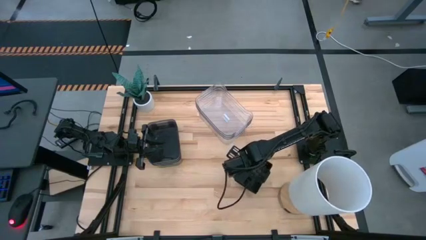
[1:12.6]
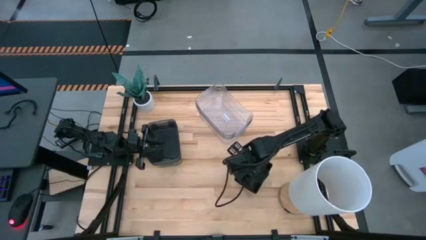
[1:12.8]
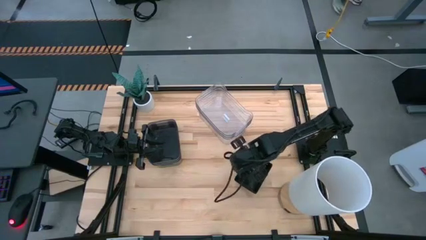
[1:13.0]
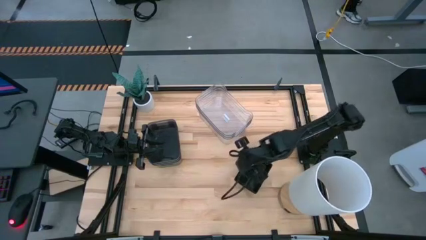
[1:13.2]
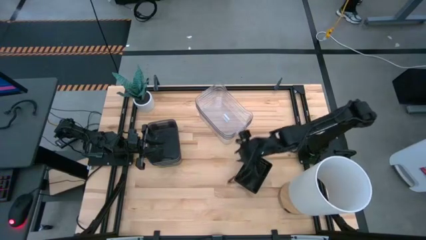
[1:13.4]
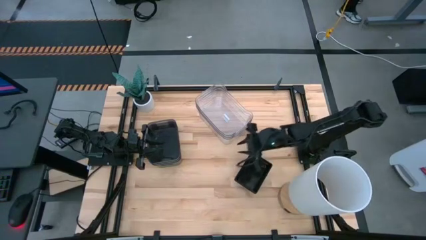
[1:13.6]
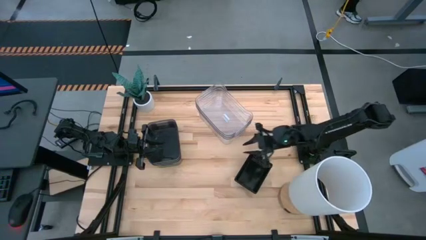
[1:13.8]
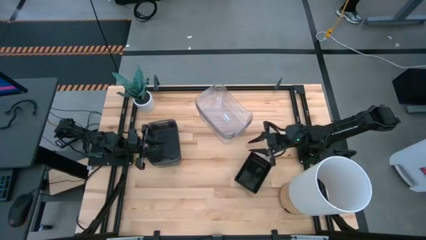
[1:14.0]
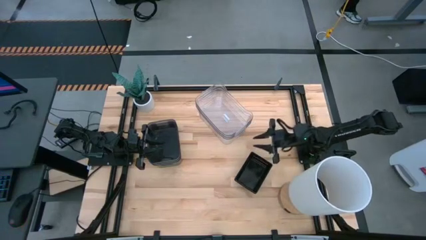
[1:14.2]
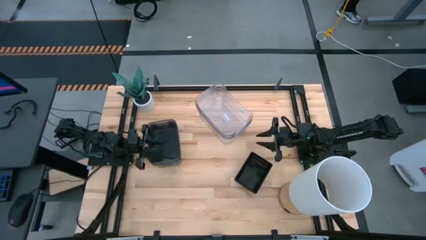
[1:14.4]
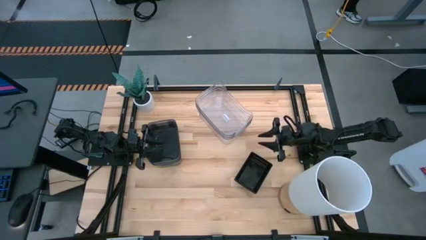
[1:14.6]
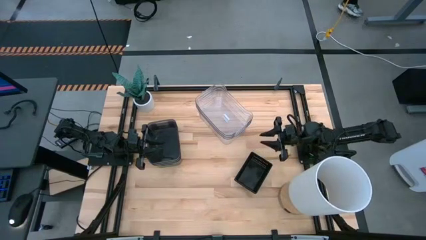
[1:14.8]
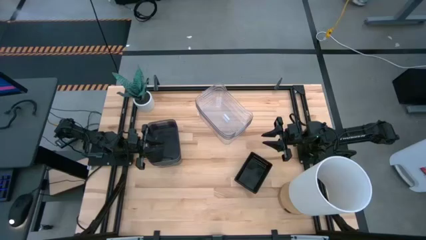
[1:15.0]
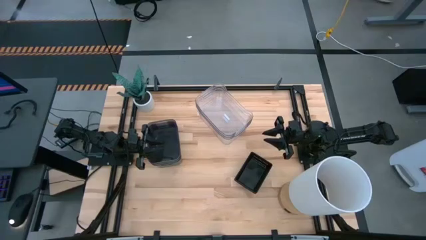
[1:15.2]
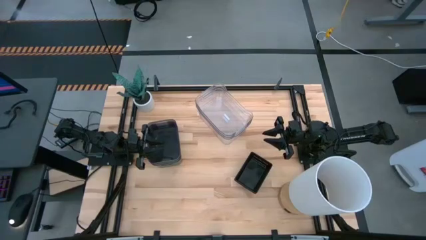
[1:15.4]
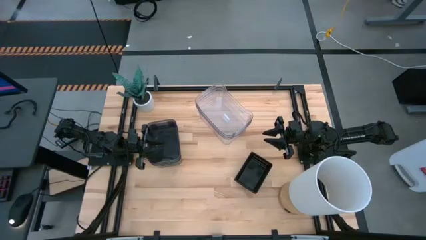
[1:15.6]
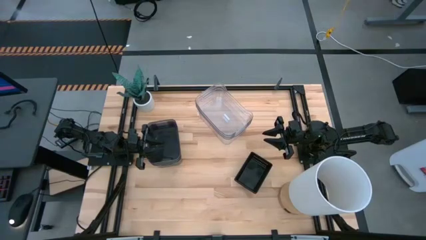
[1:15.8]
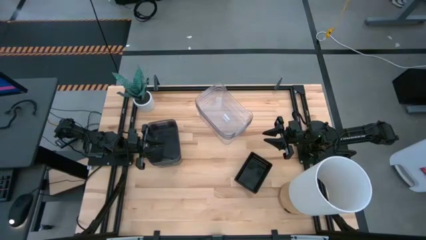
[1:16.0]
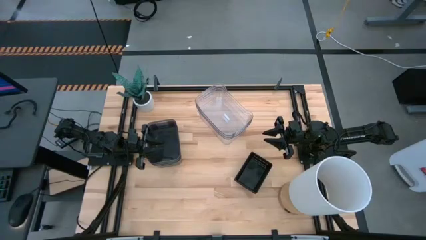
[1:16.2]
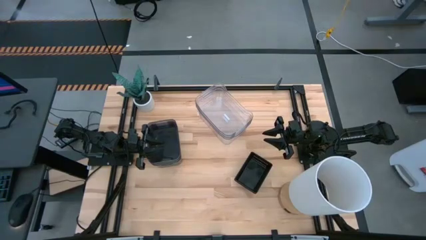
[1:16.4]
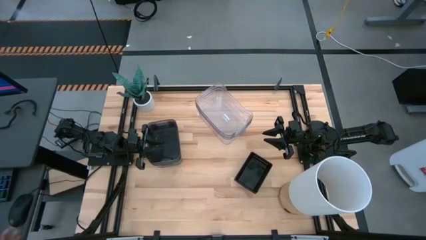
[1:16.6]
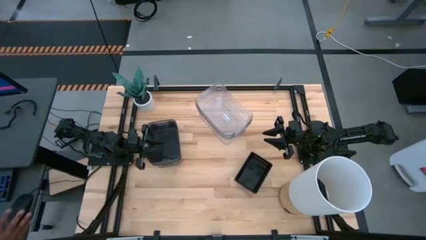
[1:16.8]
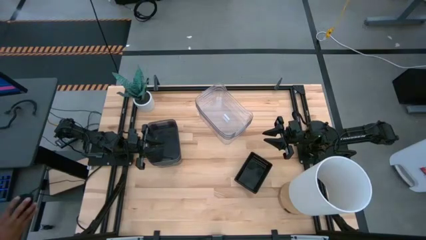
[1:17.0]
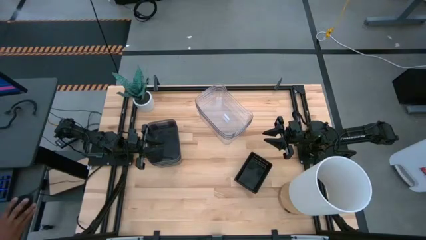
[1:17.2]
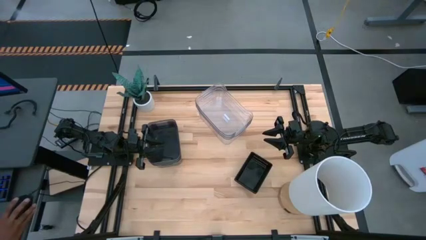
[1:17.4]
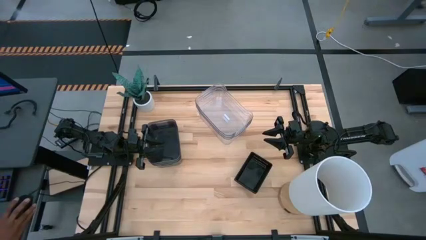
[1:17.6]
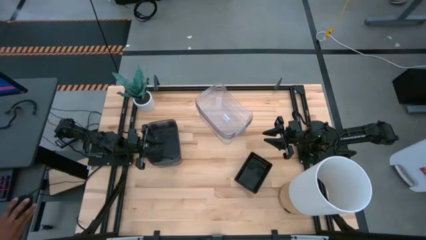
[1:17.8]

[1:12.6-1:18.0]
Return to Home Position

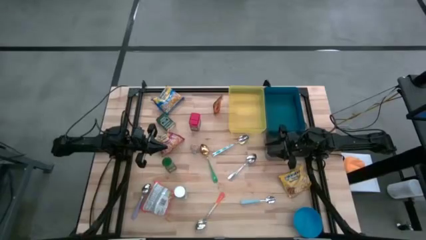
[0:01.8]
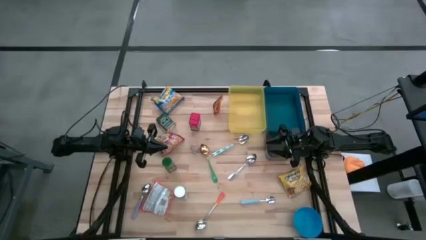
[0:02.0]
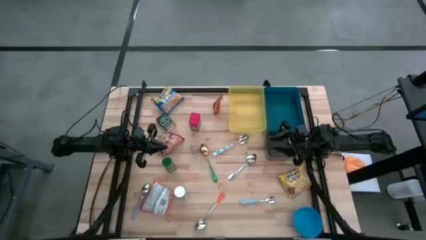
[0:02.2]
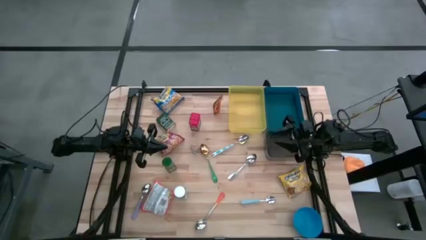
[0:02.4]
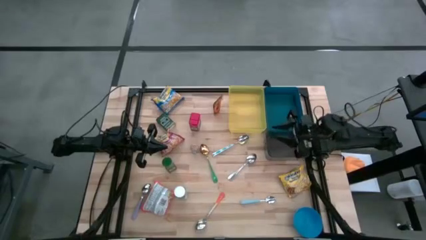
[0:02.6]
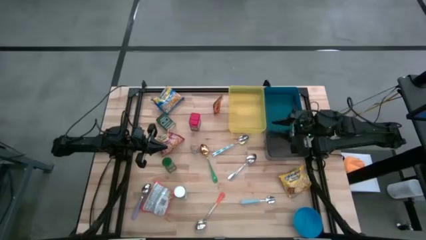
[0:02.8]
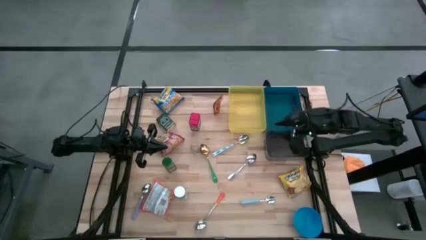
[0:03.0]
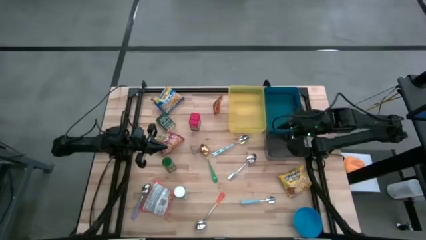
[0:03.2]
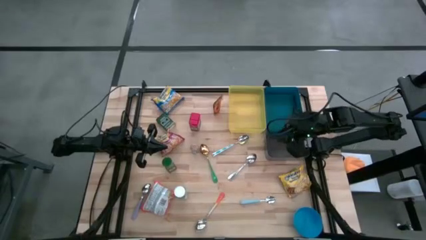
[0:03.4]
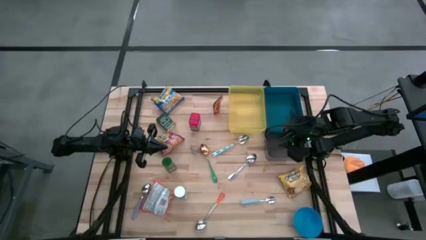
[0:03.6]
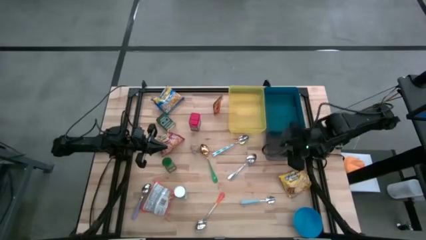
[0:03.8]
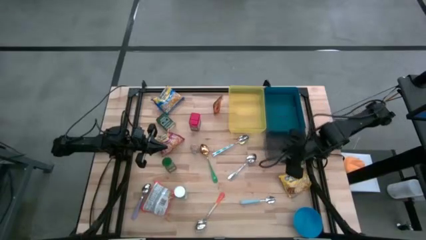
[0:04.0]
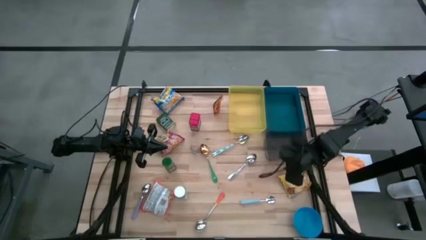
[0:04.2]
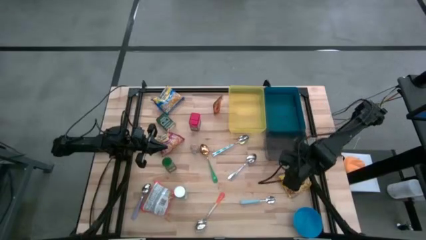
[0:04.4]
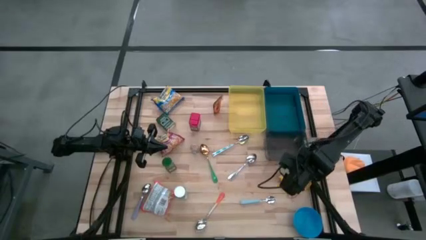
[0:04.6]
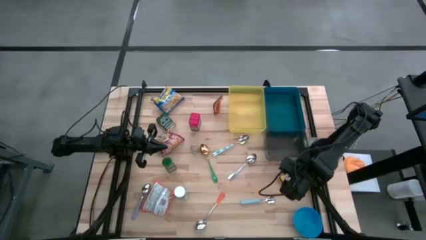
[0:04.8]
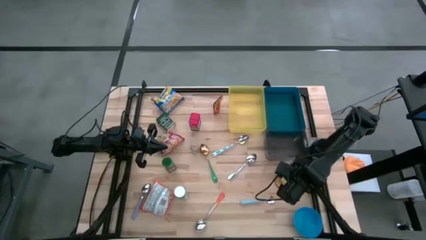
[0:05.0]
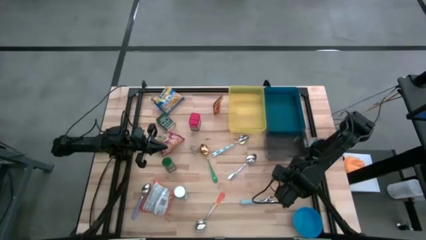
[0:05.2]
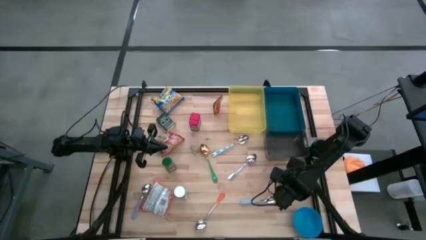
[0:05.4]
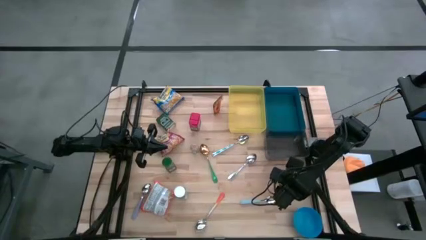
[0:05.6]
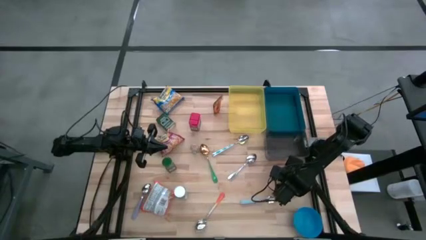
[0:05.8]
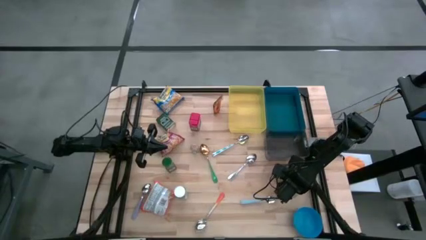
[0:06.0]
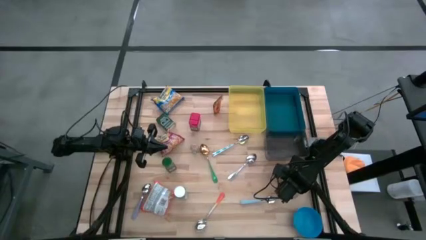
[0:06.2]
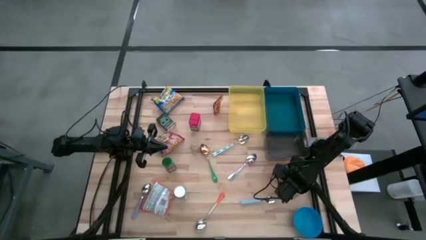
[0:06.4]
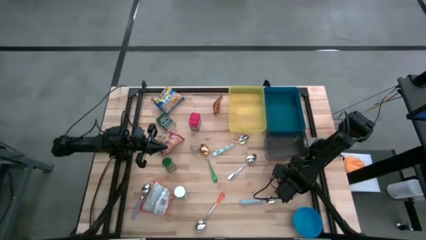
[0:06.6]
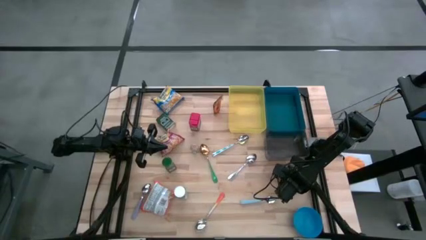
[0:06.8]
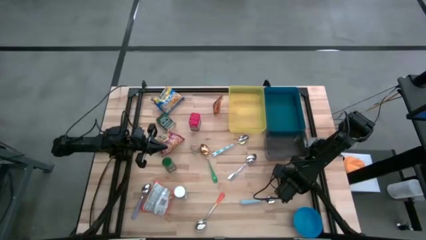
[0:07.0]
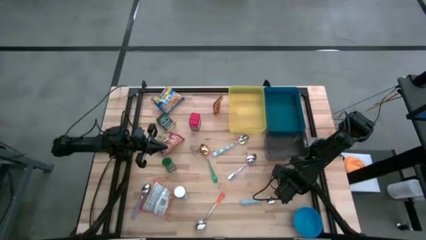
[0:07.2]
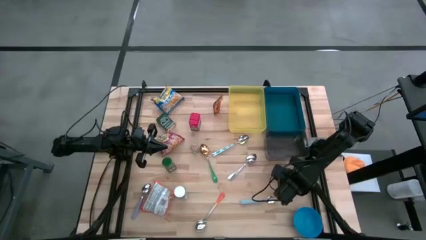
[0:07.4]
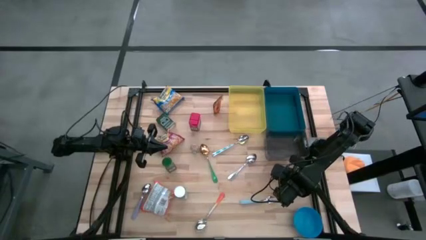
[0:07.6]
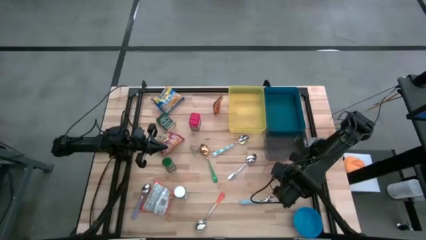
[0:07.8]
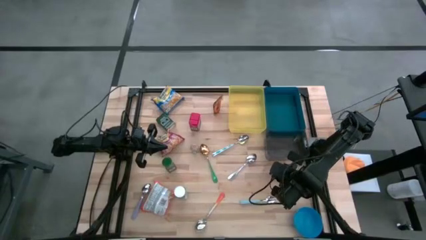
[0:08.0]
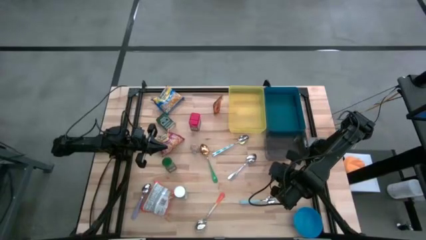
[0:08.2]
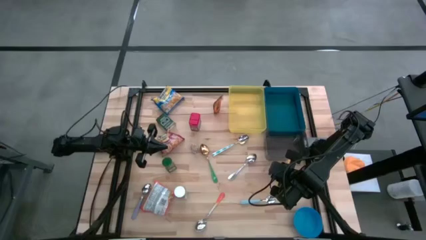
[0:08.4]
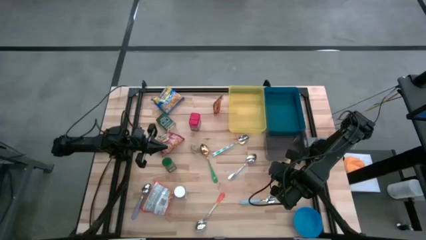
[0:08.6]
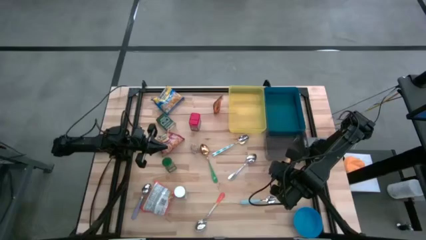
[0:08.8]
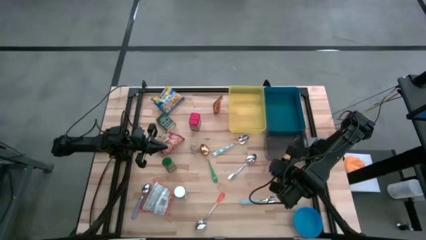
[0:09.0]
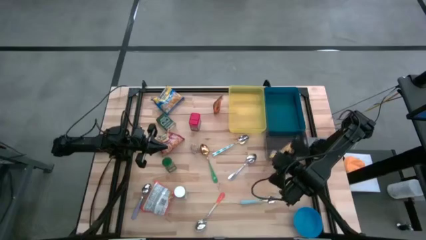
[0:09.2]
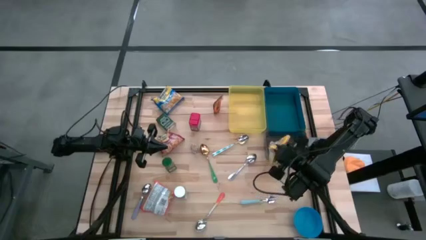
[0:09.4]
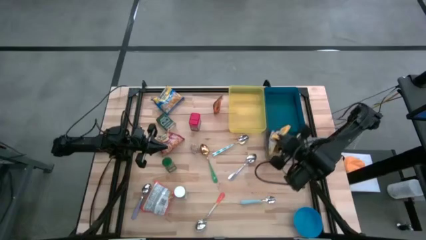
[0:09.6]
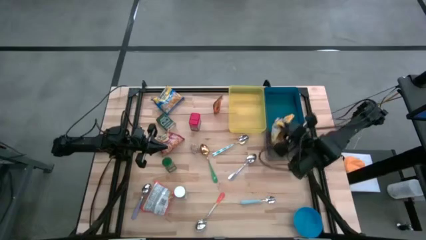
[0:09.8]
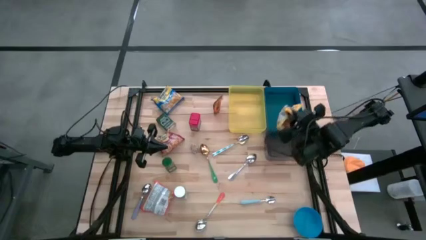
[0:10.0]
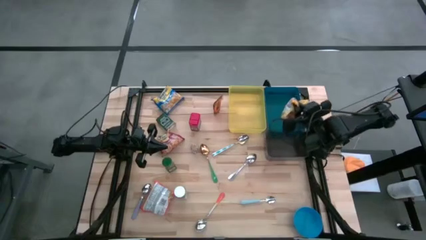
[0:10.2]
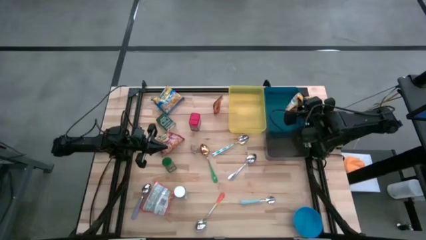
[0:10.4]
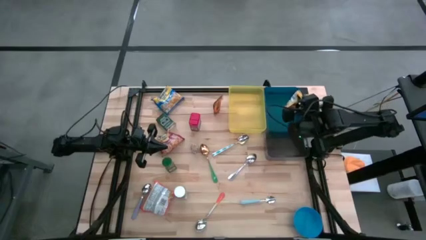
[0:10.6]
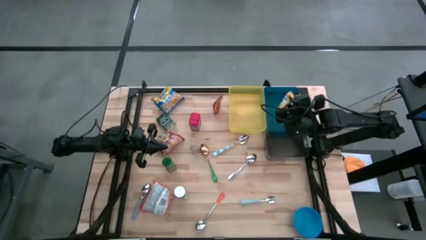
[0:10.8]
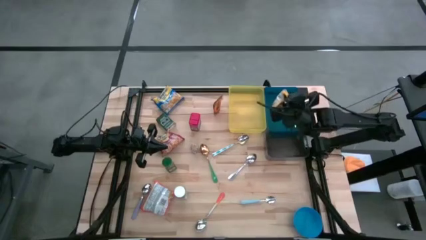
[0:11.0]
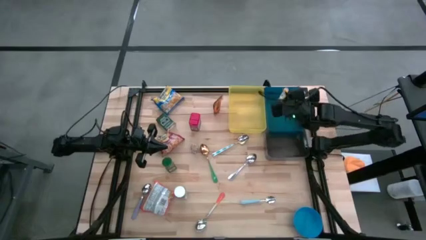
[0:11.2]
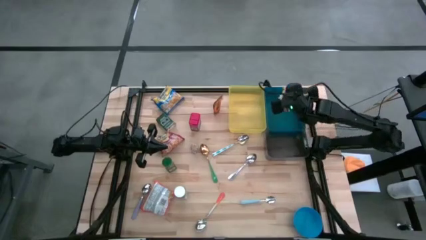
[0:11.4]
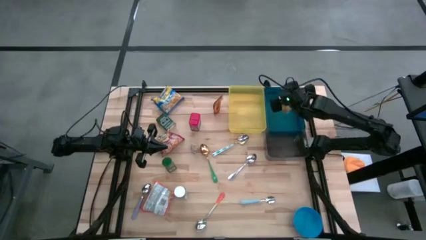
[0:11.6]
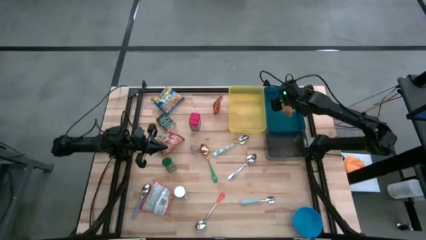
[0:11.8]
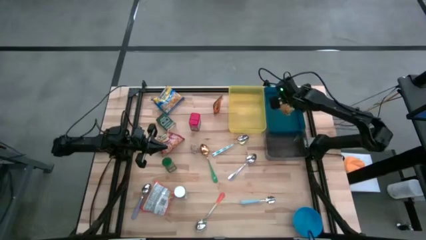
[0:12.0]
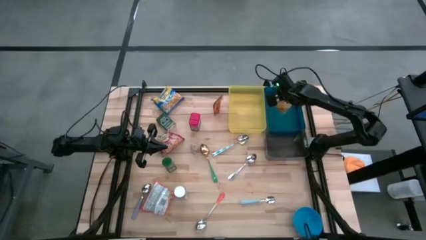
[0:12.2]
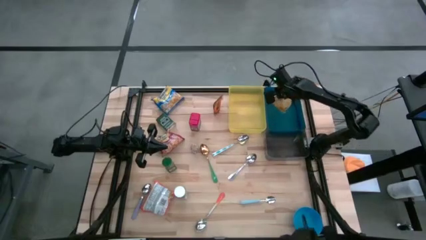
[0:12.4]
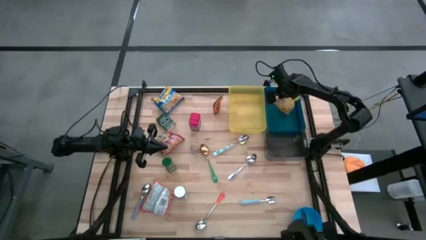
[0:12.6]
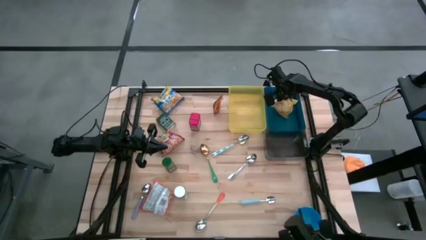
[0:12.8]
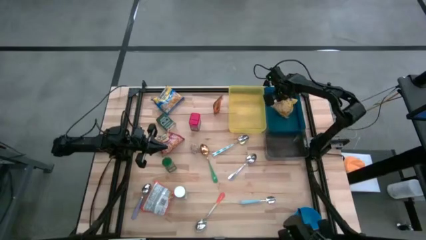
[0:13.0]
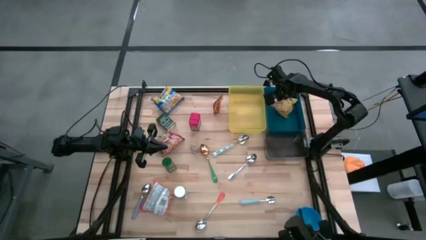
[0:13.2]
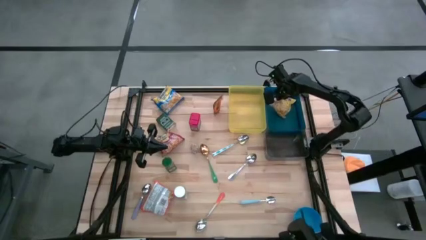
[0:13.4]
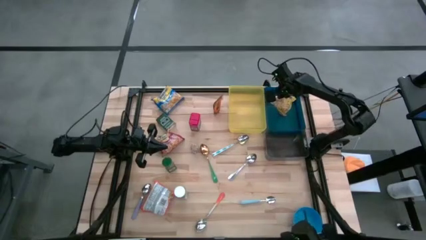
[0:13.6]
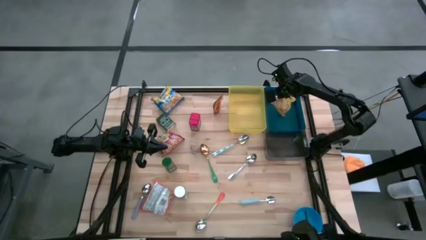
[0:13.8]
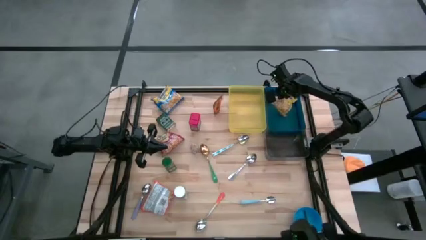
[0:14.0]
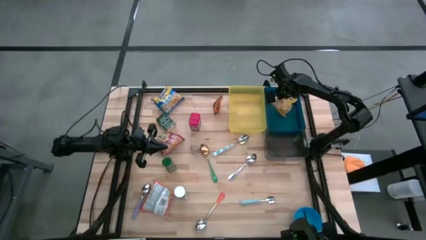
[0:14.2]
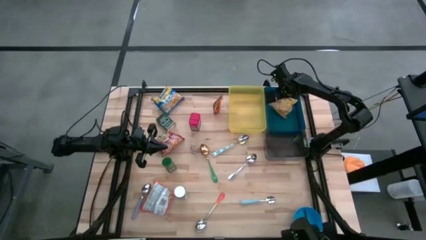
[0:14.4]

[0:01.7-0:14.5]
Put the yellow noodle pack into the blue bin
